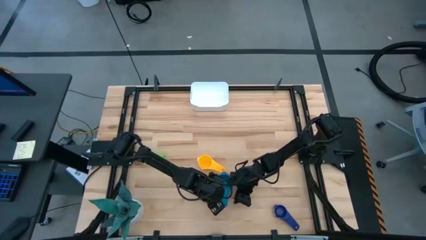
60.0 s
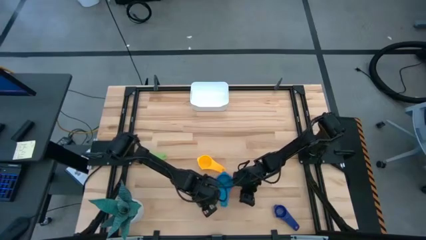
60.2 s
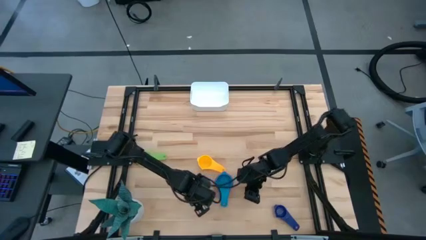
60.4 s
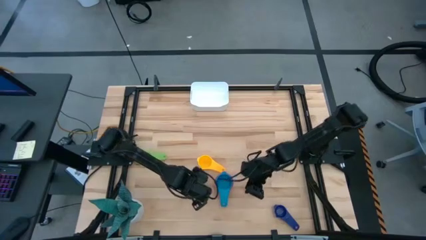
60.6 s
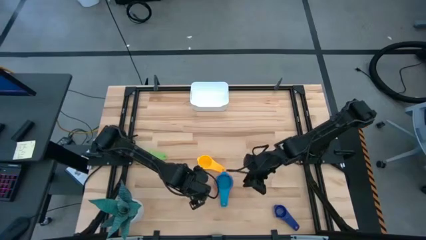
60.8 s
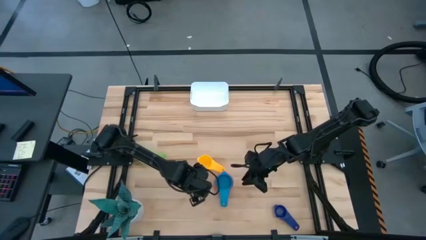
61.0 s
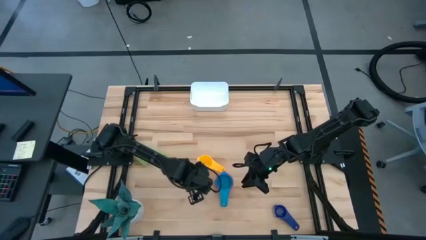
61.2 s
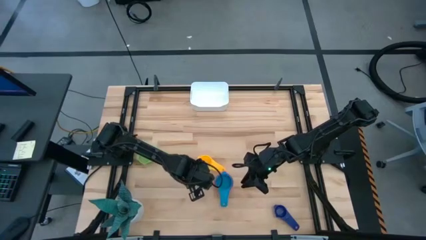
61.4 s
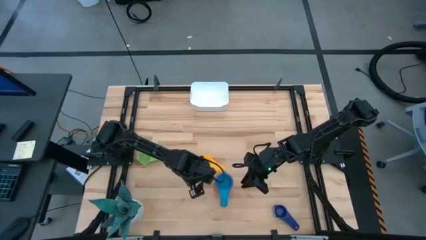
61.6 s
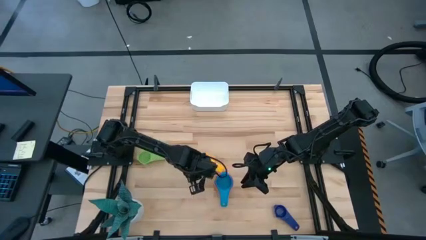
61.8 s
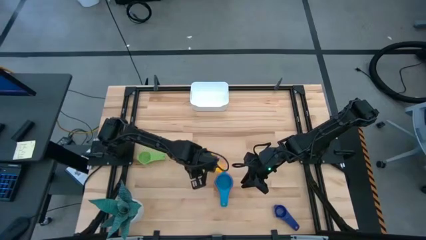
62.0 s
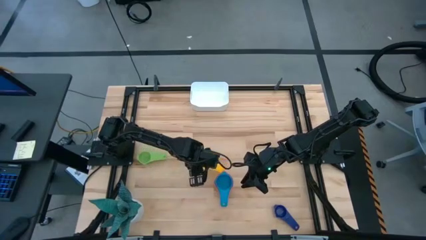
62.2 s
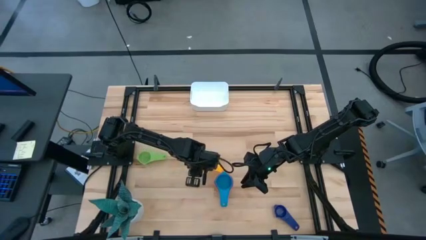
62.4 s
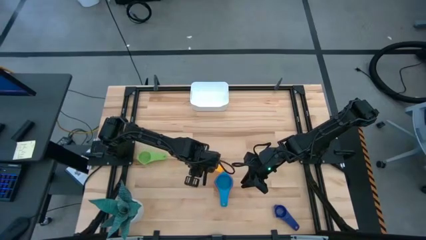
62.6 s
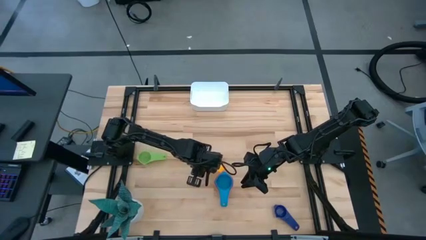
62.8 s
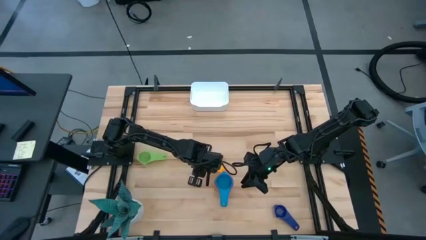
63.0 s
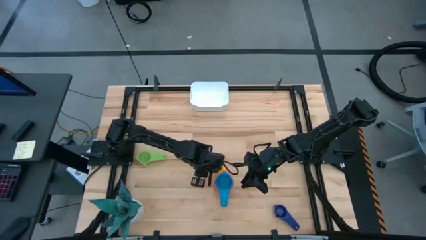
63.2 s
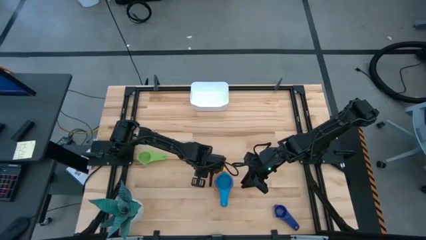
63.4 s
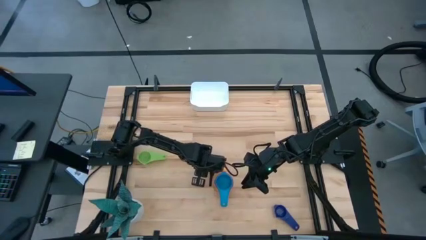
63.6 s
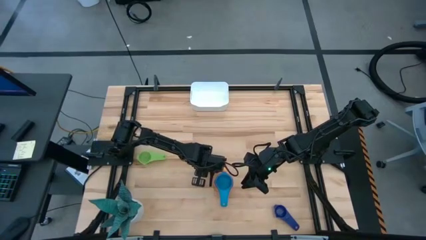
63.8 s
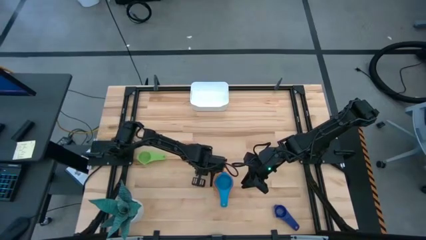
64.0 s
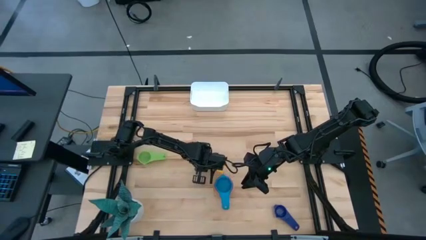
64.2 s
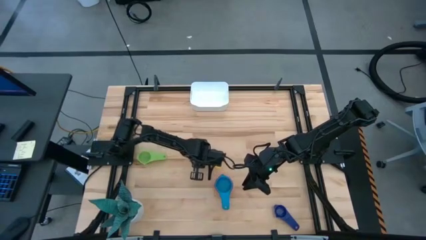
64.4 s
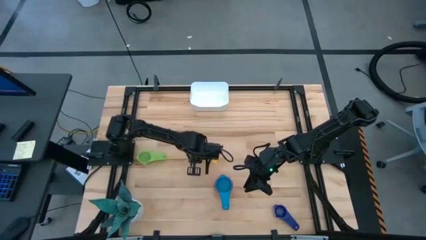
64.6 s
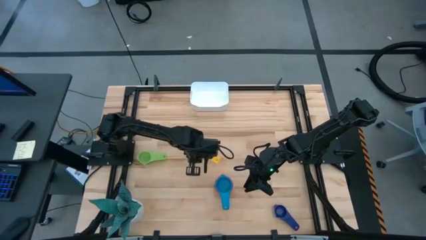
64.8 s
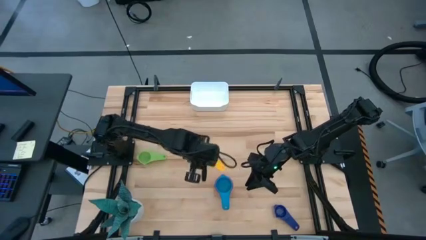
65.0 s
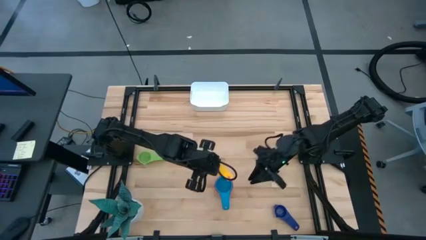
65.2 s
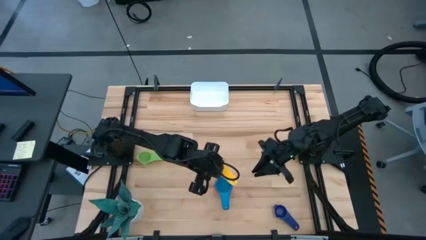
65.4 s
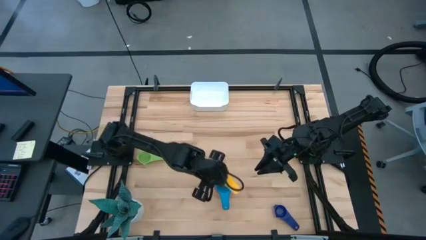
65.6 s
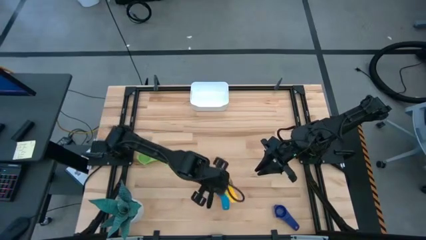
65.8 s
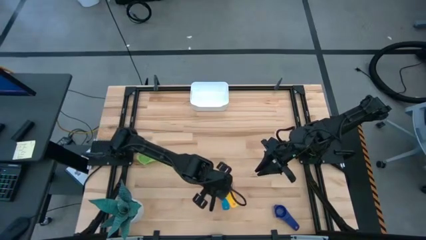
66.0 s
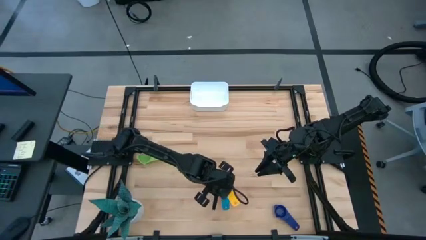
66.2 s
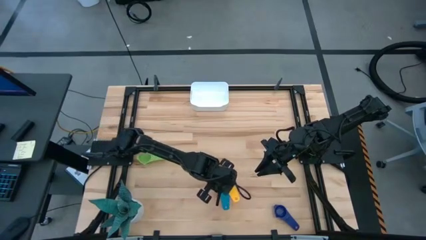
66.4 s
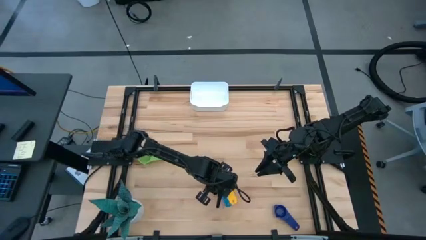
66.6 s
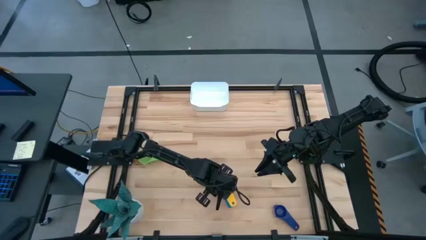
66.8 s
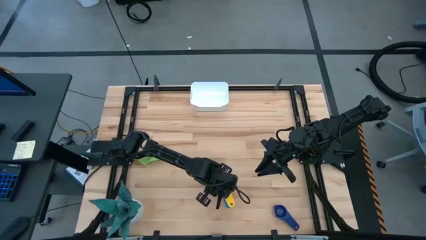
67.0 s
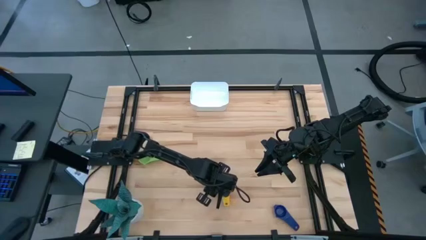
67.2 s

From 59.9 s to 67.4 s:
Task: Nest measuring cups in basket
Stack the yellow measuring cup on top of the light blue measuring cup

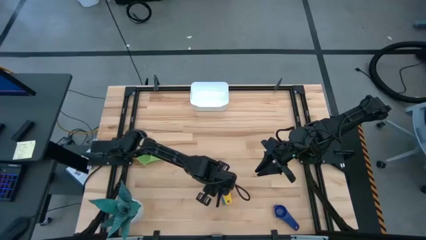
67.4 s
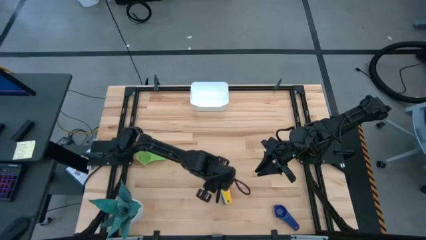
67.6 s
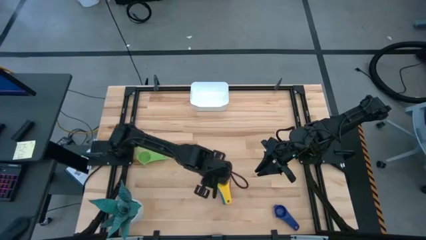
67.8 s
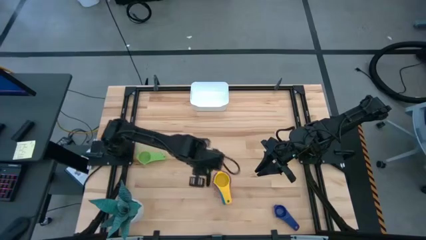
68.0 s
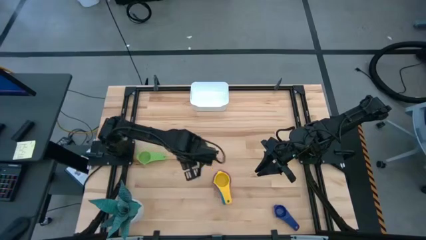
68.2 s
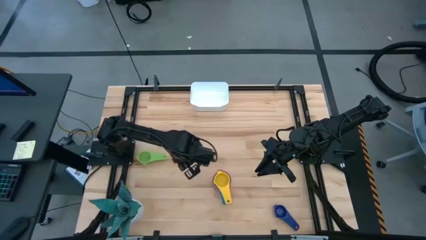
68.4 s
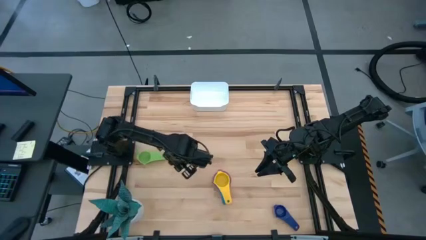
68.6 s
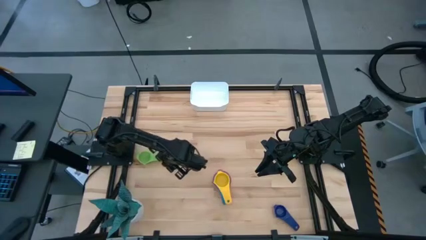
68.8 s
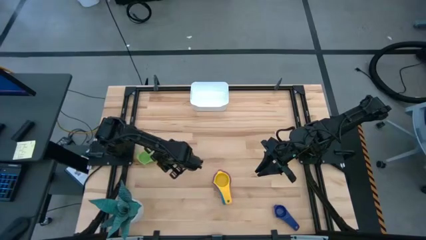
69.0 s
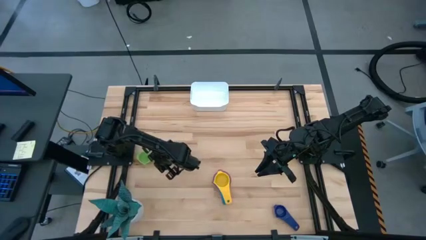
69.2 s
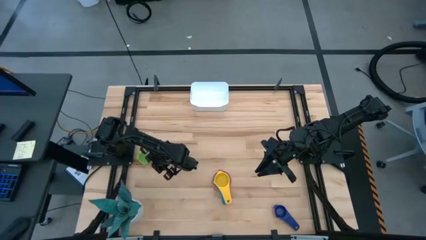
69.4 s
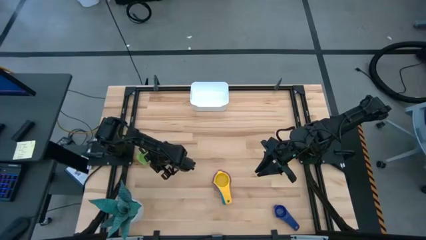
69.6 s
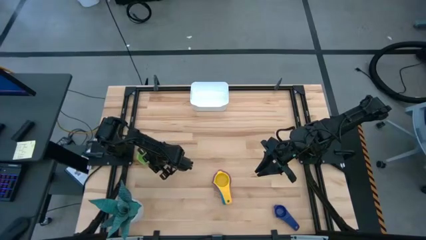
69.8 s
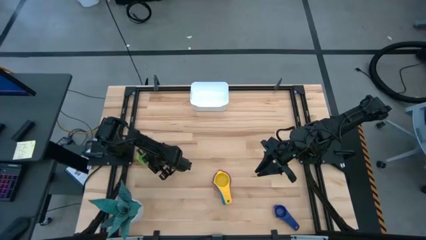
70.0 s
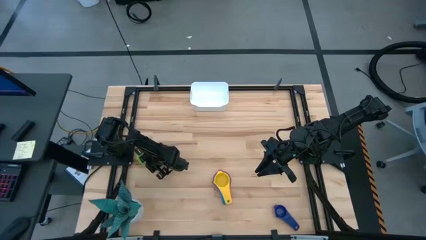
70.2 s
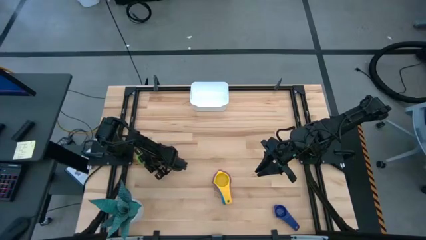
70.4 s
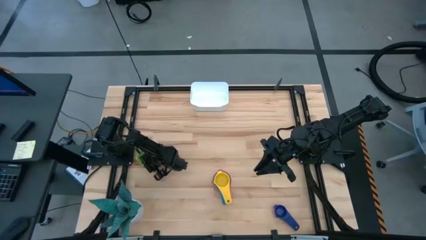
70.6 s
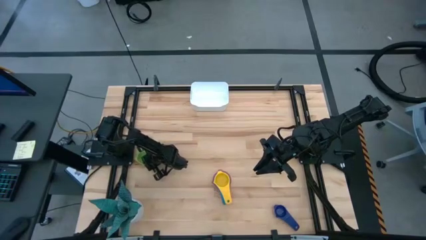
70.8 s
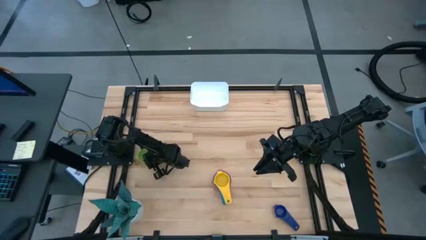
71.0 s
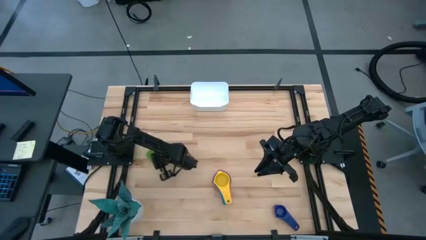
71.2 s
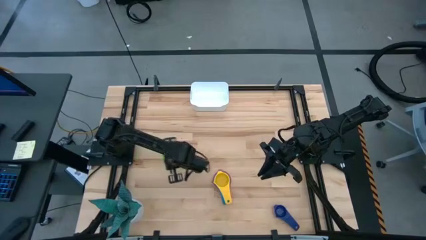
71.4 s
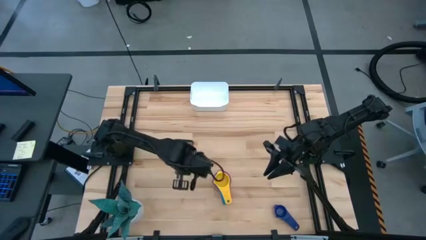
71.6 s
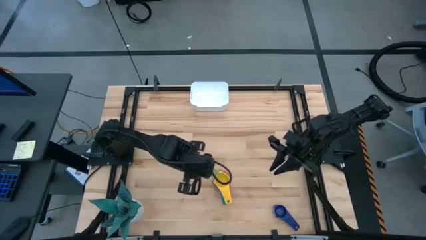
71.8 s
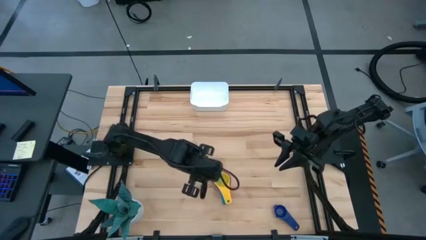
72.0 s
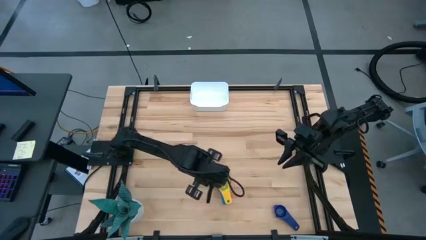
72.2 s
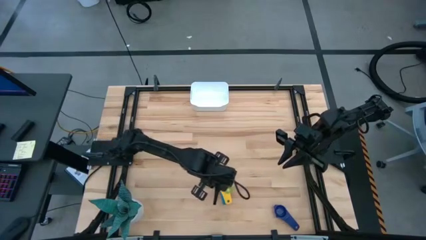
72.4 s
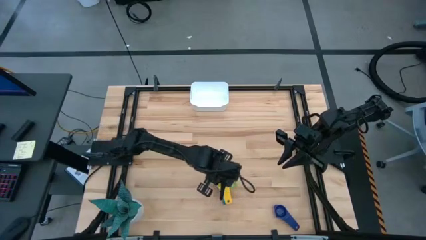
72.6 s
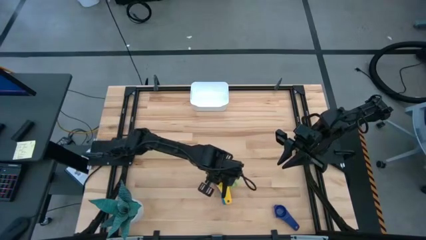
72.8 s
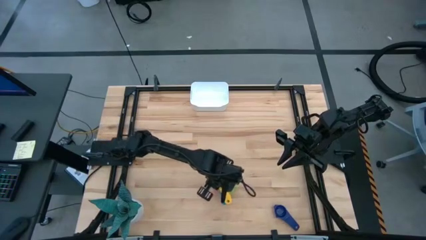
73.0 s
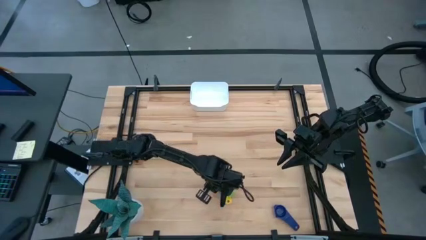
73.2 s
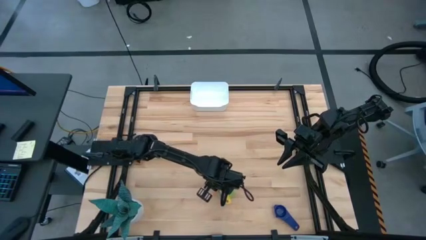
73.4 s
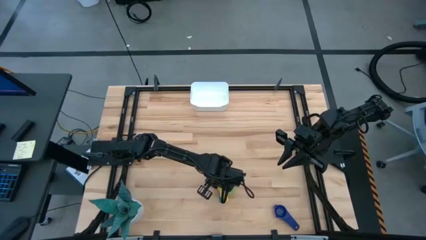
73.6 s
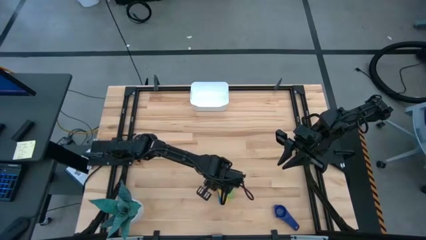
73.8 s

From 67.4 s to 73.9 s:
Stack the green measuring cup on top of the yellow measuring cup

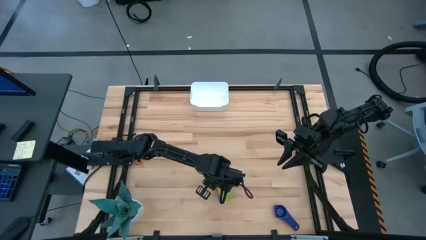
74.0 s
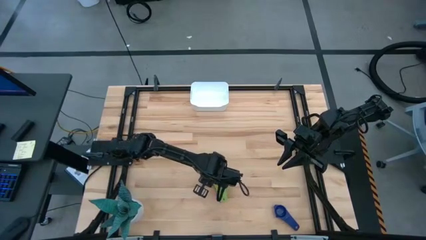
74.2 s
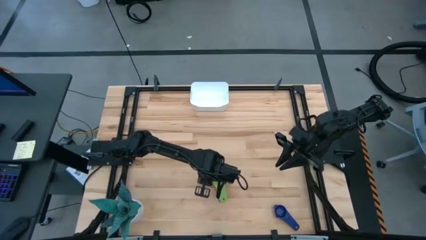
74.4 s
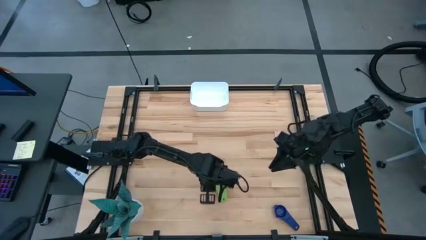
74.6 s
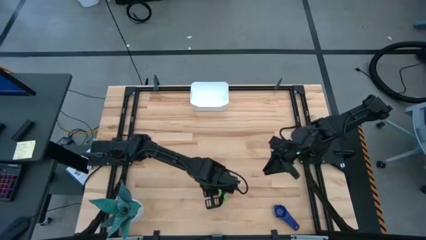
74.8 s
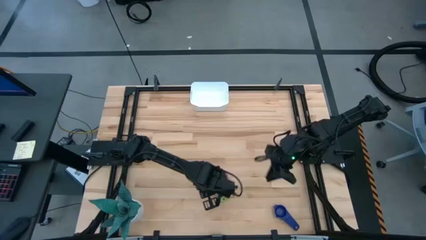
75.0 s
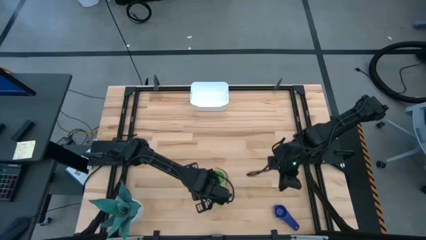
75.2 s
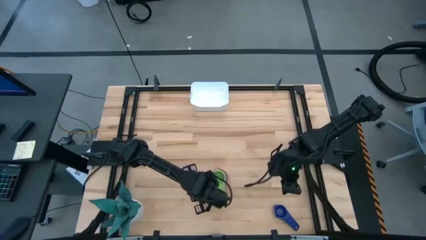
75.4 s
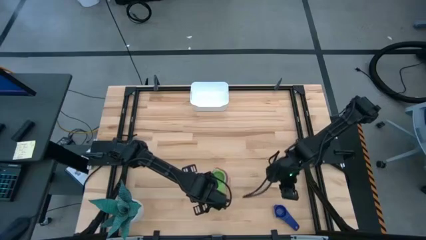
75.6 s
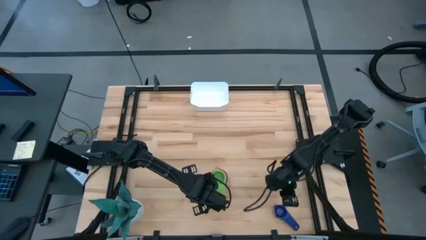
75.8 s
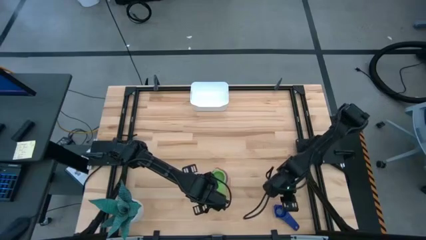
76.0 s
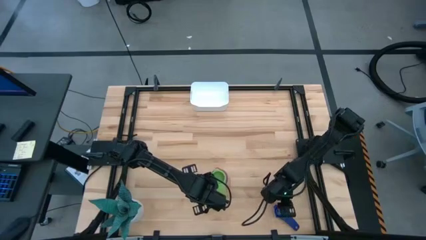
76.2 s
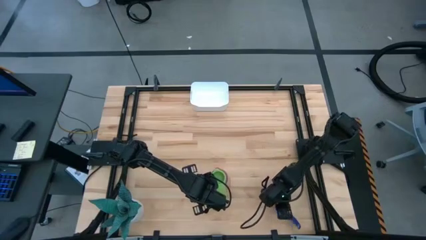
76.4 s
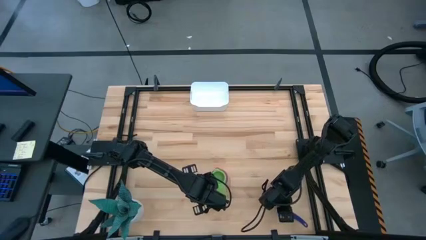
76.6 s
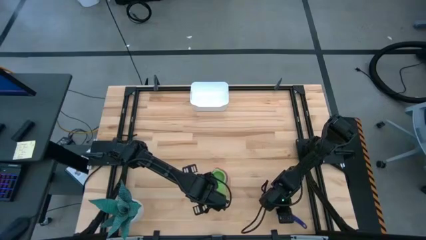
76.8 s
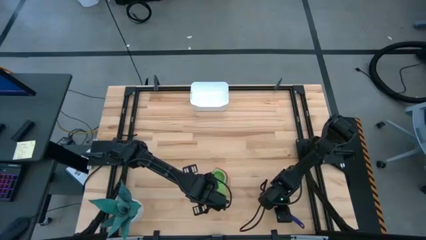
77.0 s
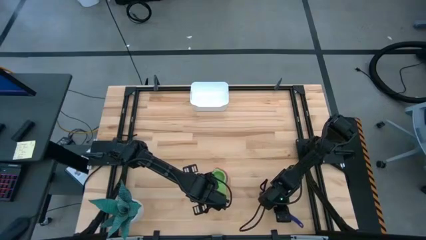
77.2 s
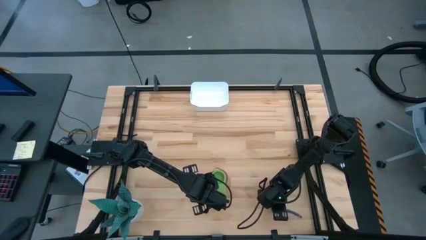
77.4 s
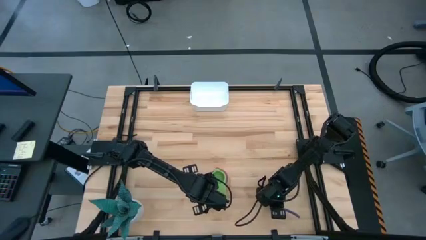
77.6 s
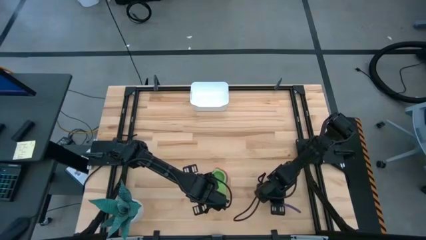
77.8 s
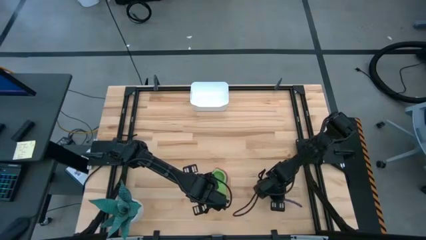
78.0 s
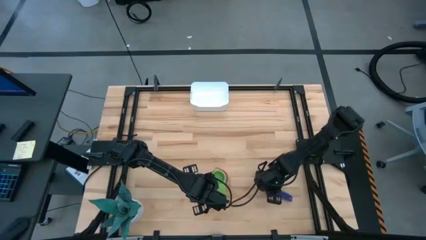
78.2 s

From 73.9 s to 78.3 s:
Stack the dark blue measuring cup on top of the green measuring cup
